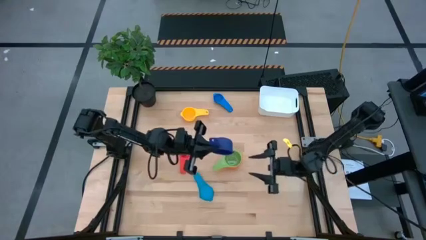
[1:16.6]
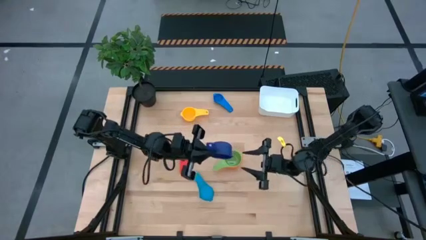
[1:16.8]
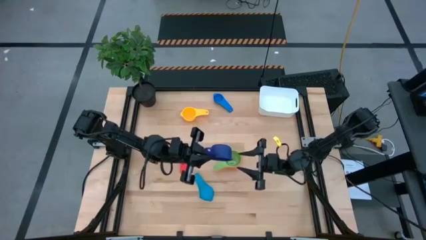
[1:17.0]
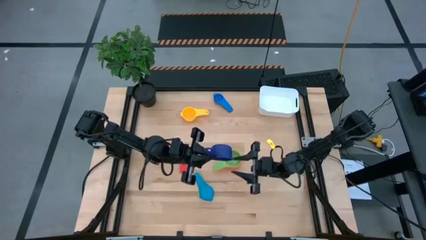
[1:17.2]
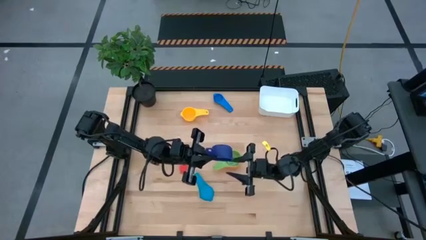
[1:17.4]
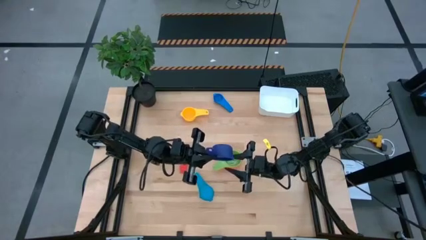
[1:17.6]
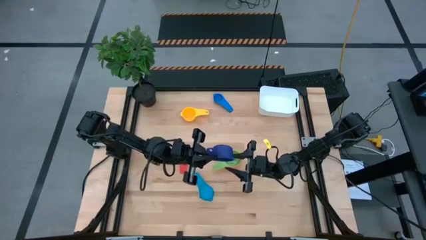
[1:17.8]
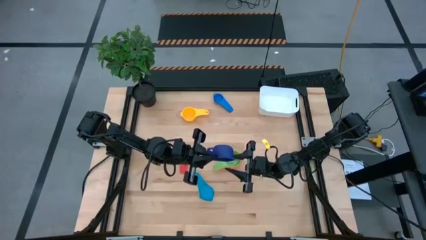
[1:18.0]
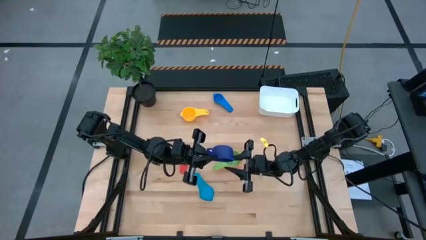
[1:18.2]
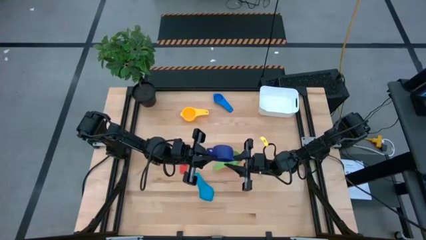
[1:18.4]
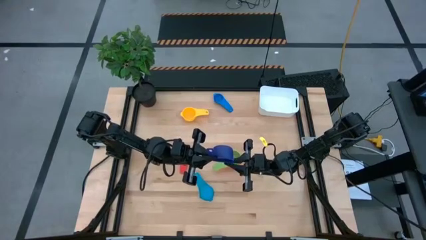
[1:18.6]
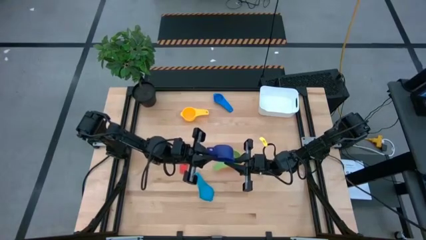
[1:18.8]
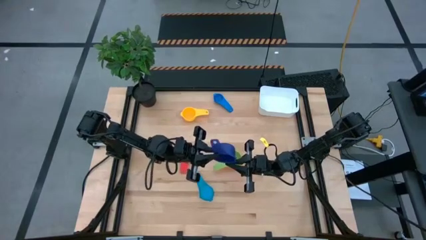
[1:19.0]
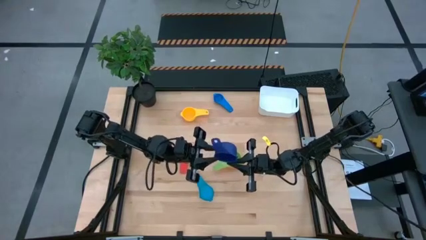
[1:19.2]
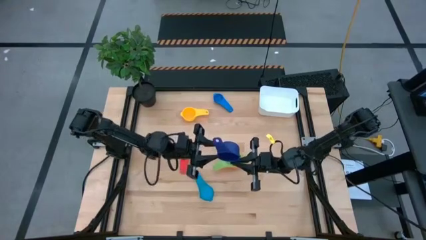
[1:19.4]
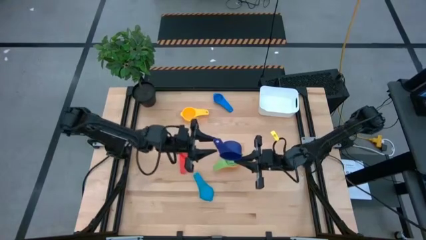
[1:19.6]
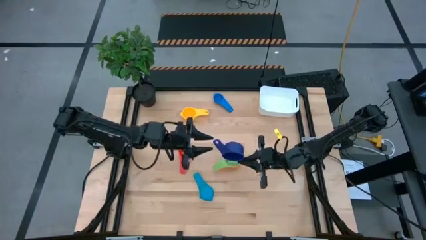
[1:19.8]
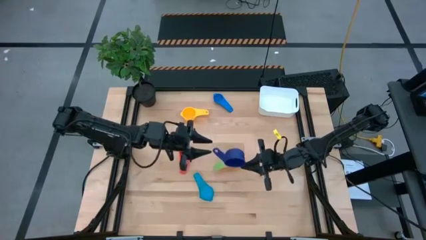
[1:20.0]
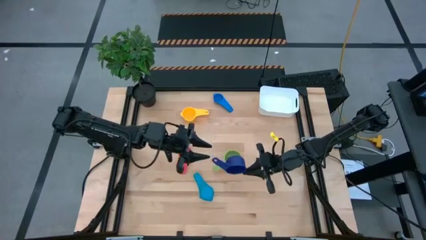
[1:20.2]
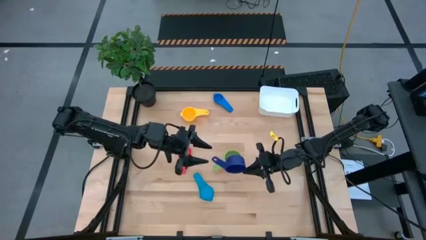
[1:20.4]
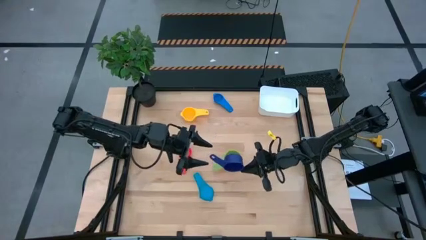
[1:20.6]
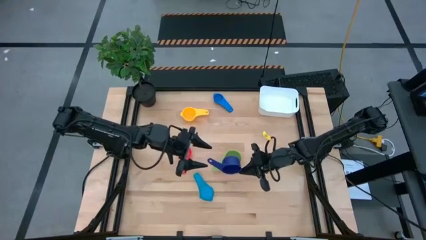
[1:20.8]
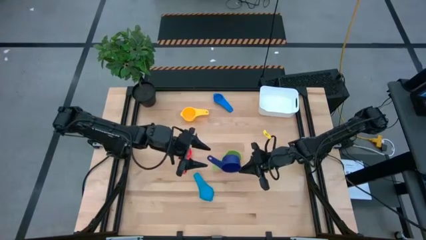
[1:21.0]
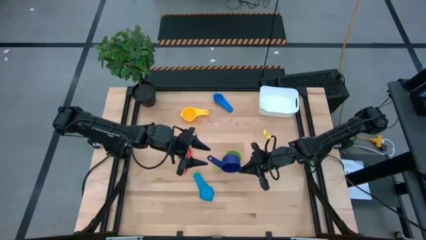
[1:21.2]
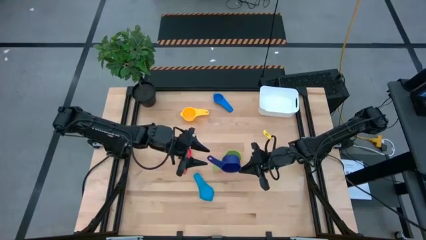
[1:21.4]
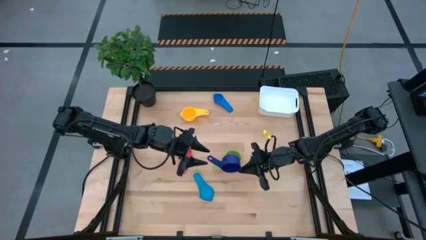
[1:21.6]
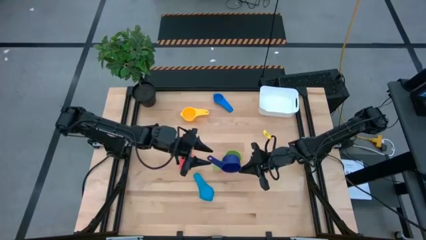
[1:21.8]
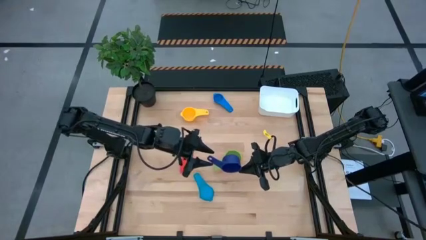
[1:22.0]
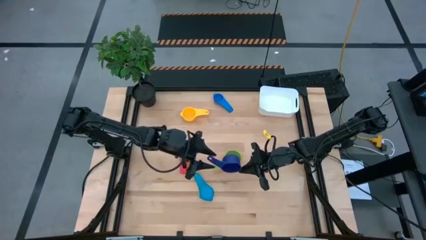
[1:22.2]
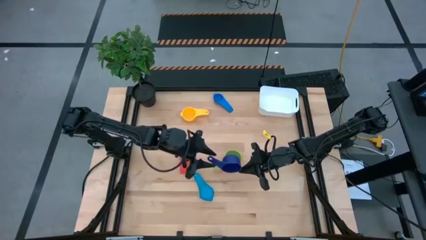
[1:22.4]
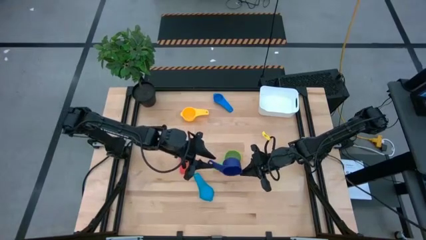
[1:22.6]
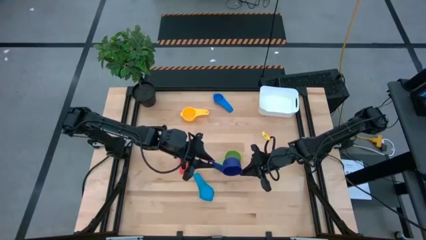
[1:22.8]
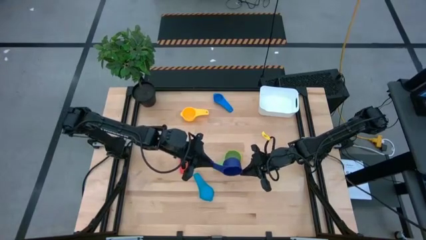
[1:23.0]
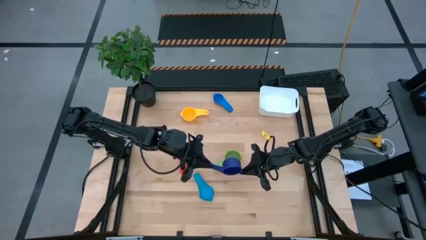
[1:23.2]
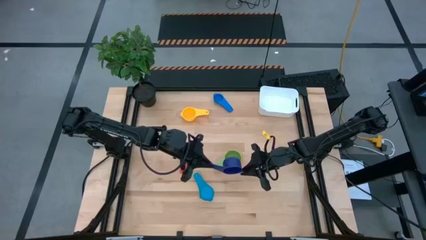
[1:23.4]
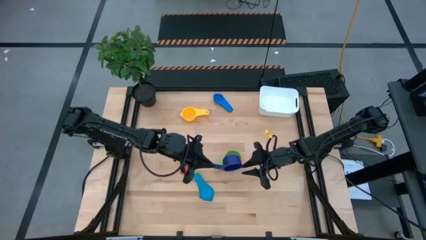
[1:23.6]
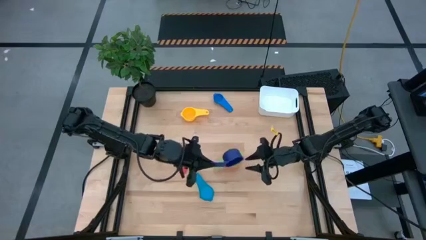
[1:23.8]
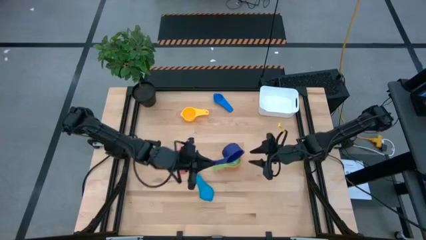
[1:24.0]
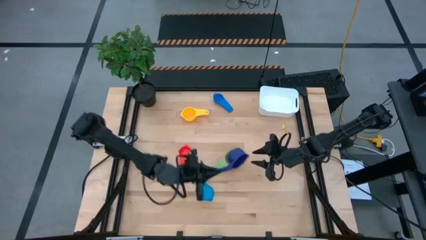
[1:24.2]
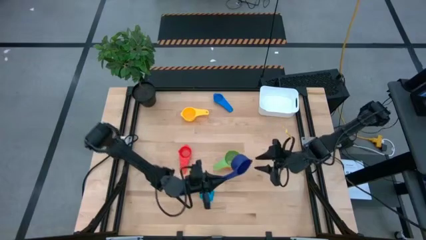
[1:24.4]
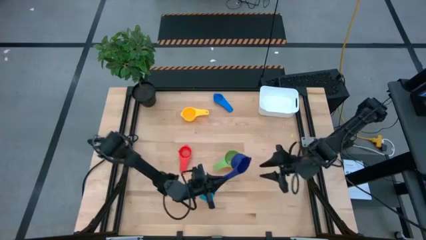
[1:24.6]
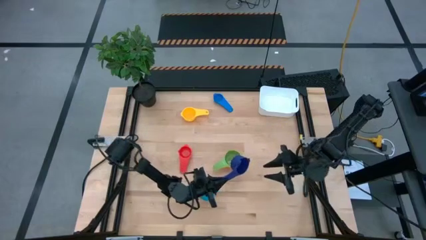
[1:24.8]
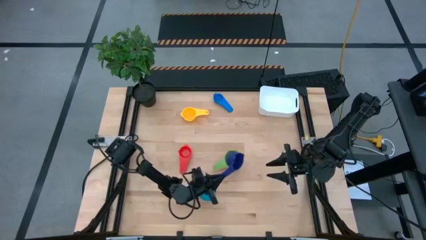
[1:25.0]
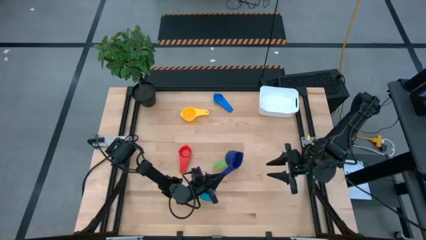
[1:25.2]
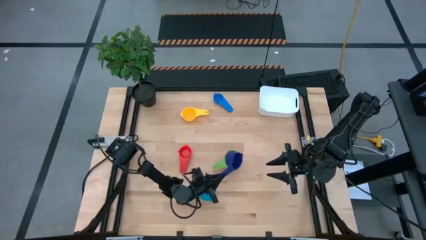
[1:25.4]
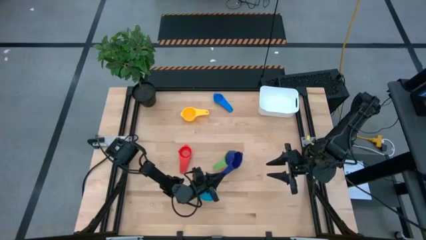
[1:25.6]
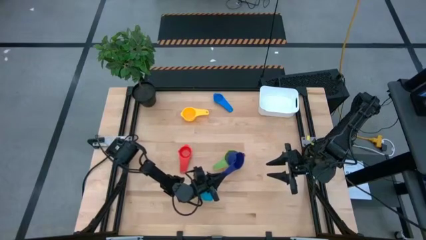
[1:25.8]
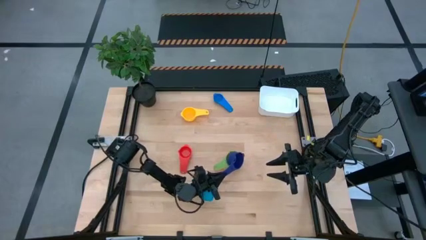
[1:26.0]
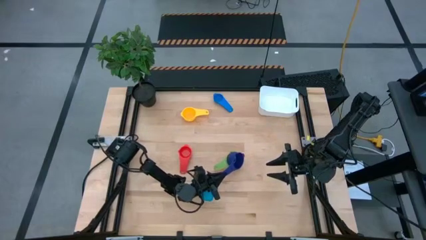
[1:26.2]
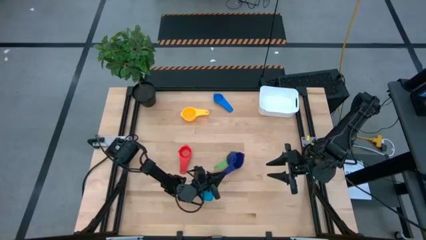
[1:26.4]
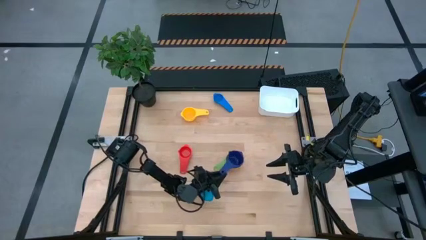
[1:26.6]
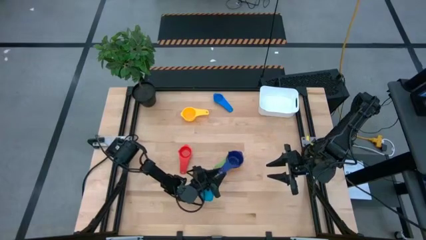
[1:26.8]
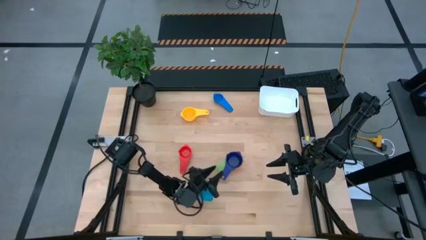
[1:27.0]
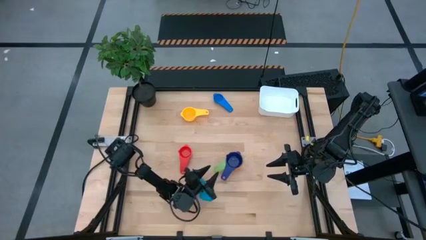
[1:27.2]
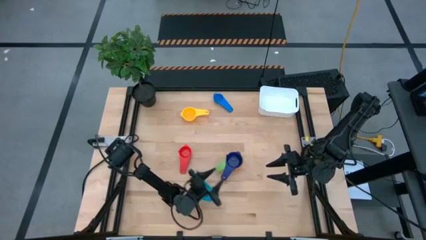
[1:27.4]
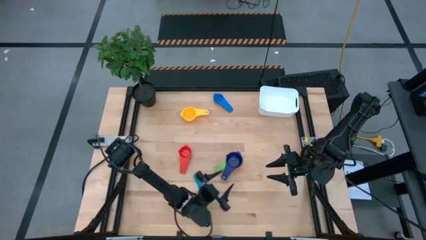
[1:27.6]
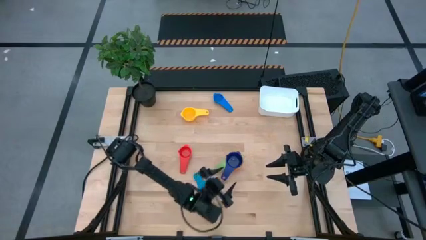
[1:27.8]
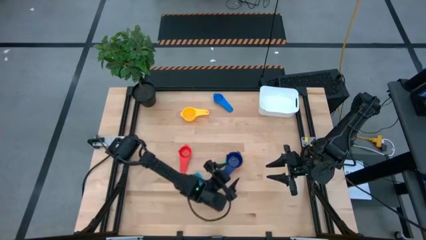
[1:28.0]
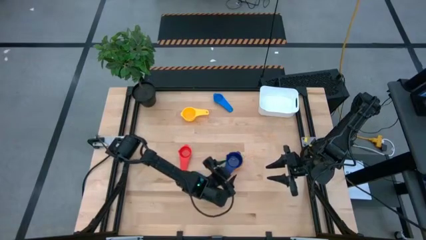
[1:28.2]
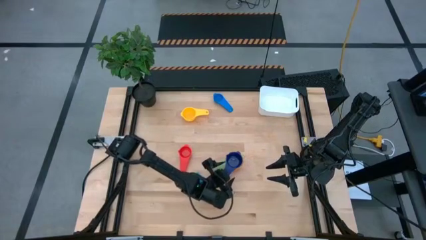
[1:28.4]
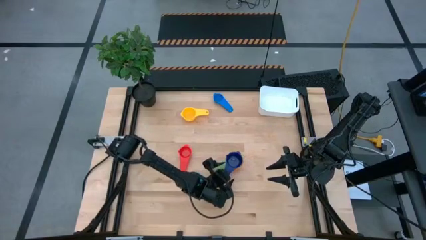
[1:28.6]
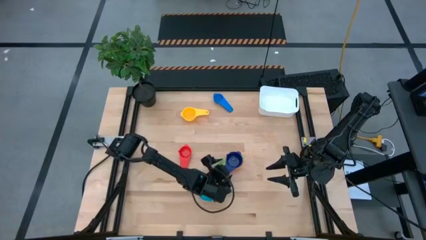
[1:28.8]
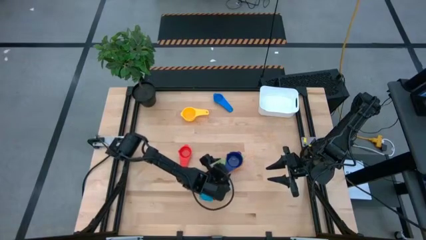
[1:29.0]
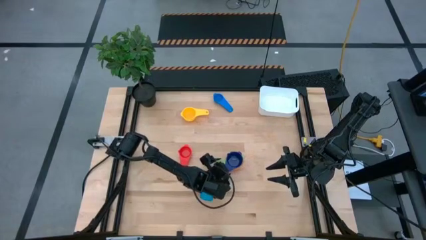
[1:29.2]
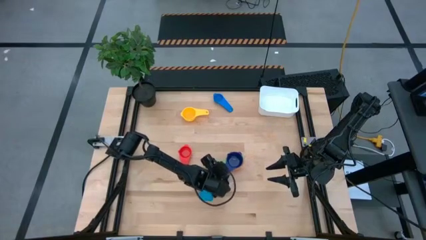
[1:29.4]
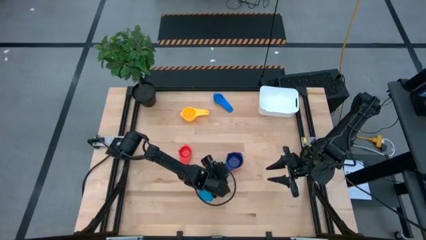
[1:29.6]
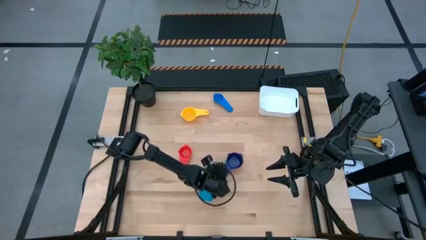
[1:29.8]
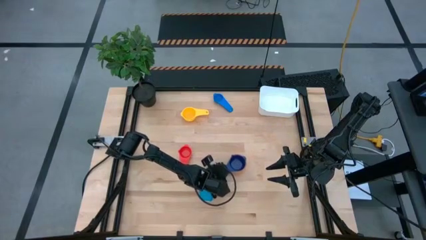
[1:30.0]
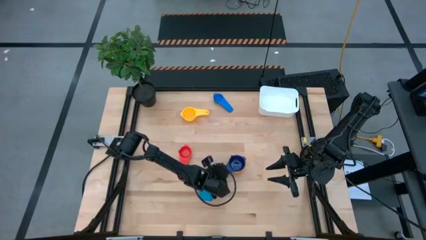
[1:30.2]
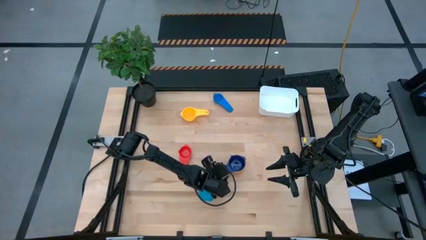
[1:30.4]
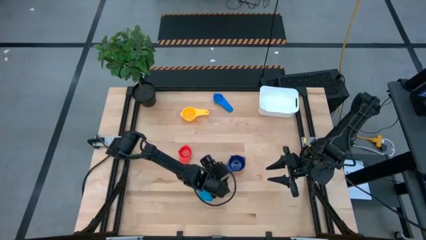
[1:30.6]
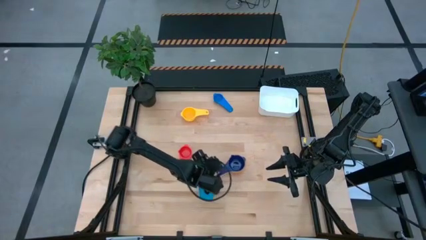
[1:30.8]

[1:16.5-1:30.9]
Task: Nest measuring cups in basket
Stack the purple measuring cup on top of the green measuring cup

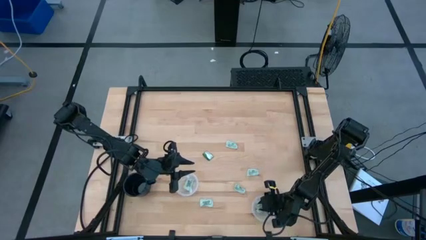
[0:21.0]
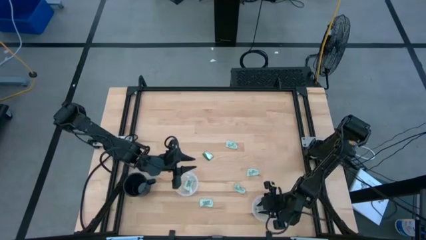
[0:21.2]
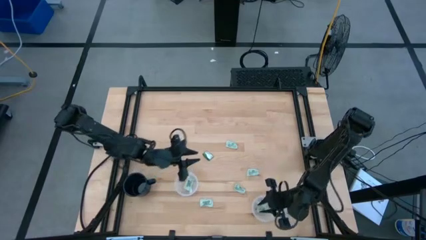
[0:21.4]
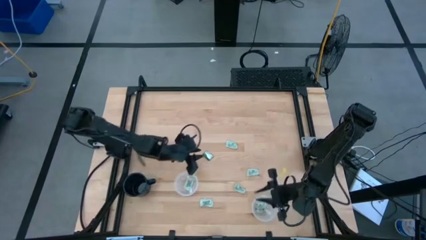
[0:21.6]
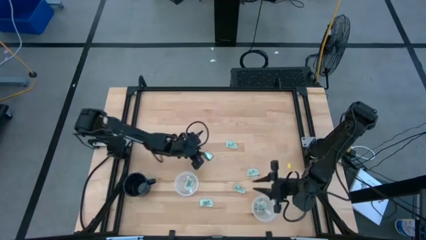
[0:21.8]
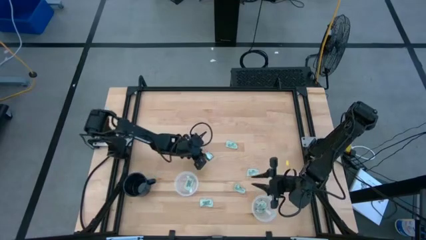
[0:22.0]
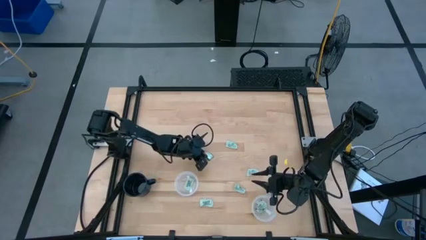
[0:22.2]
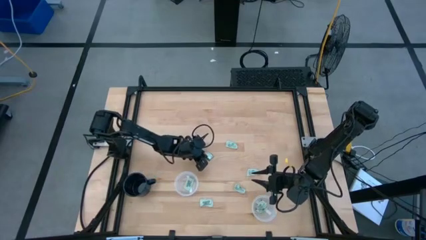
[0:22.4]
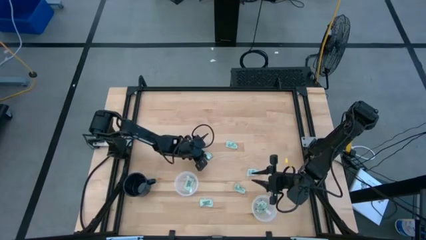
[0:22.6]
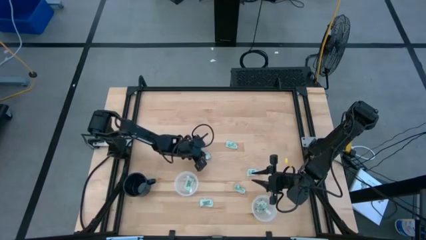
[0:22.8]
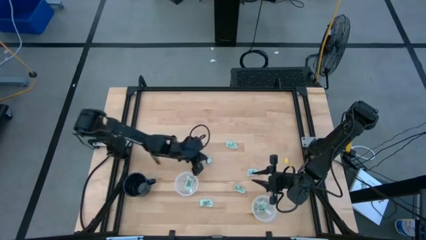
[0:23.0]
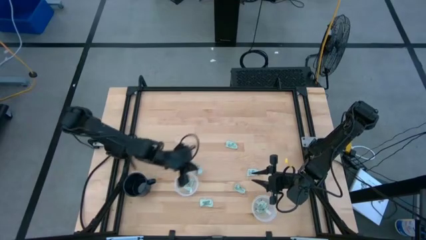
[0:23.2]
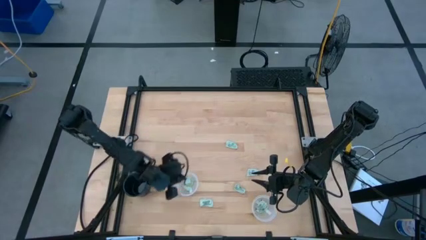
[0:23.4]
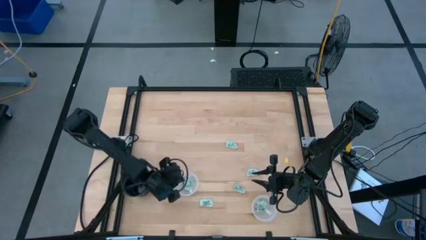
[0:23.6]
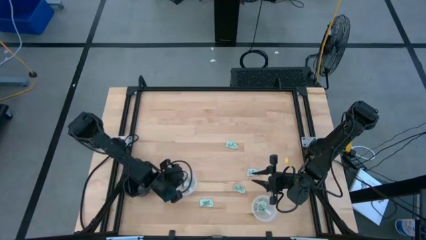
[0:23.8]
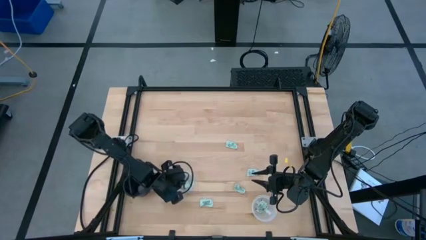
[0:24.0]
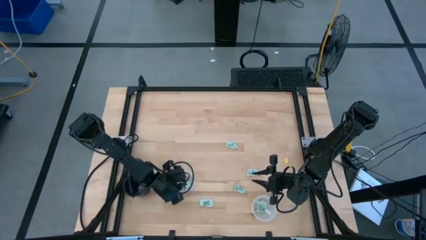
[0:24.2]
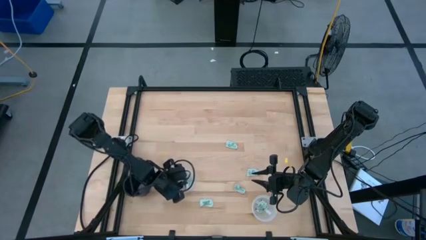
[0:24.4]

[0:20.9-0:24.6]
Task: Pick and place items into bin
Put the truvia packet into the top transparent bin
